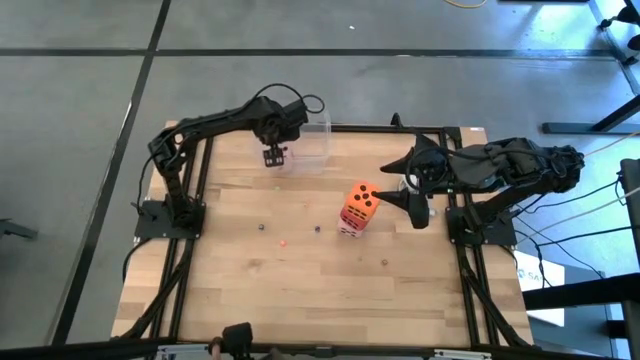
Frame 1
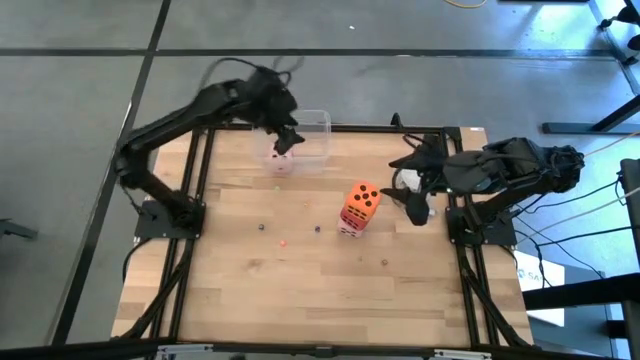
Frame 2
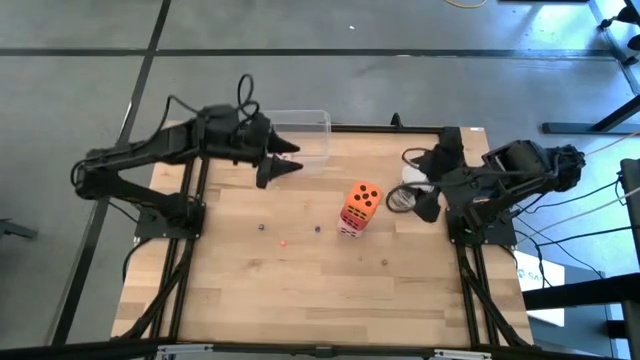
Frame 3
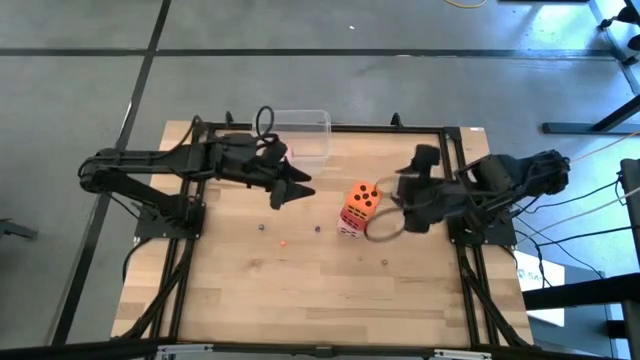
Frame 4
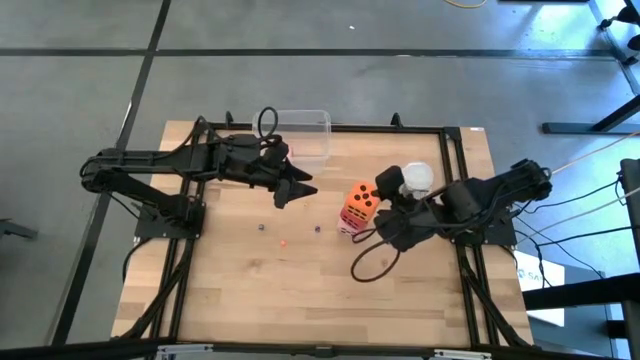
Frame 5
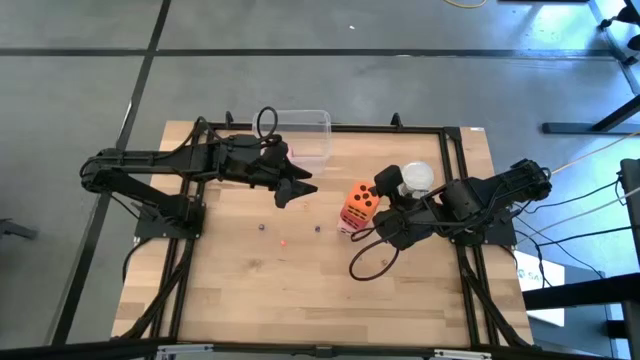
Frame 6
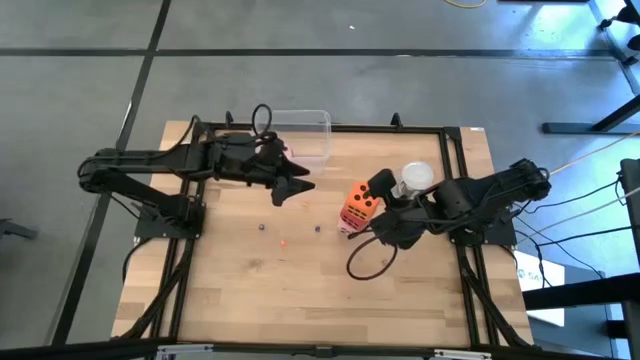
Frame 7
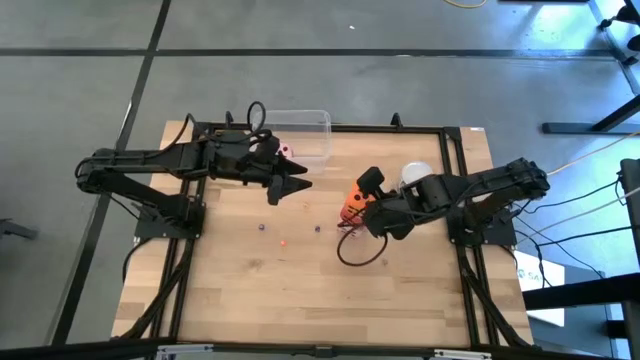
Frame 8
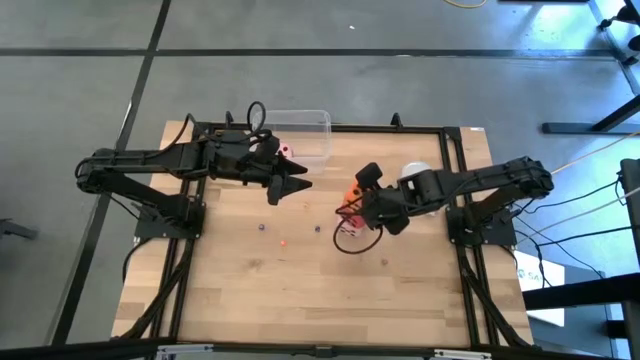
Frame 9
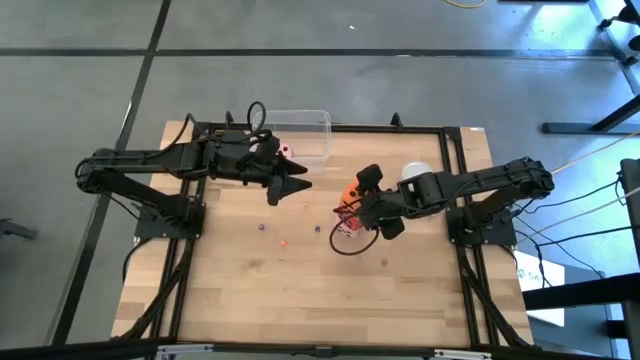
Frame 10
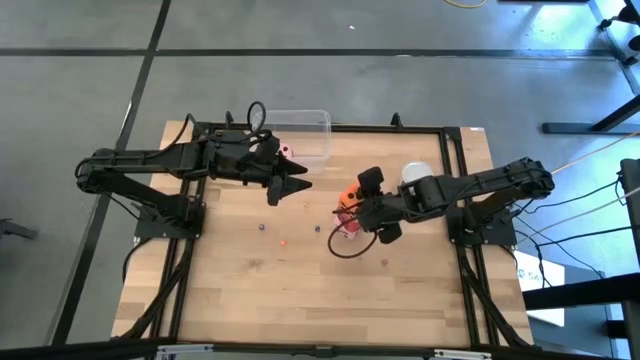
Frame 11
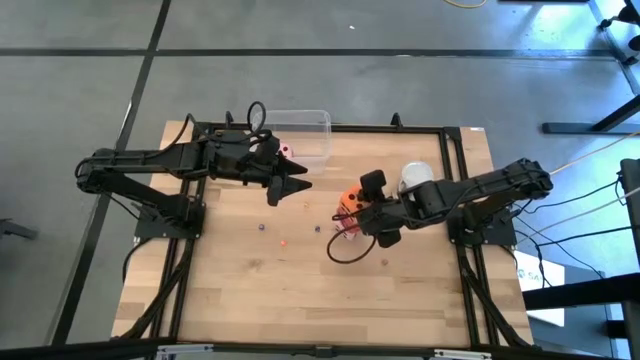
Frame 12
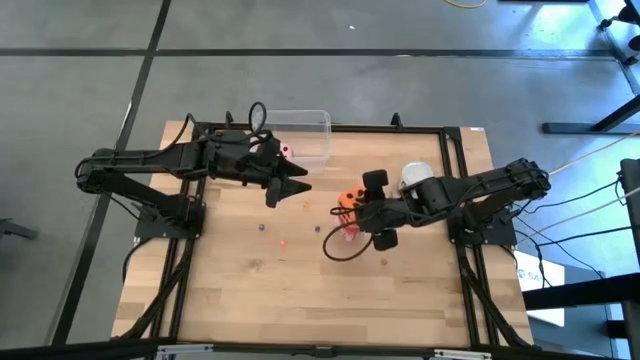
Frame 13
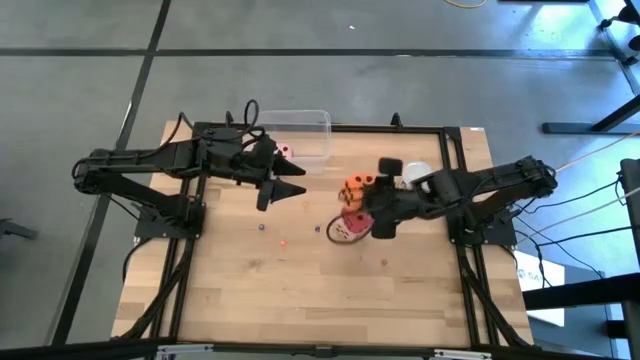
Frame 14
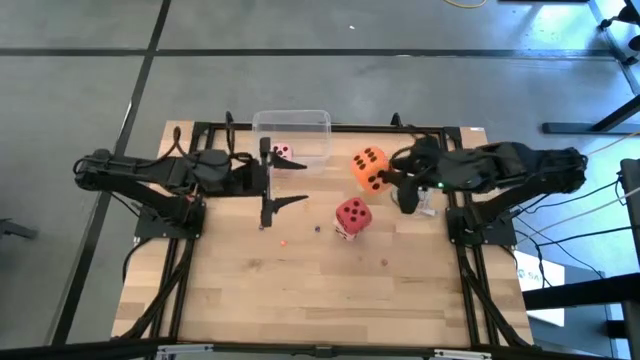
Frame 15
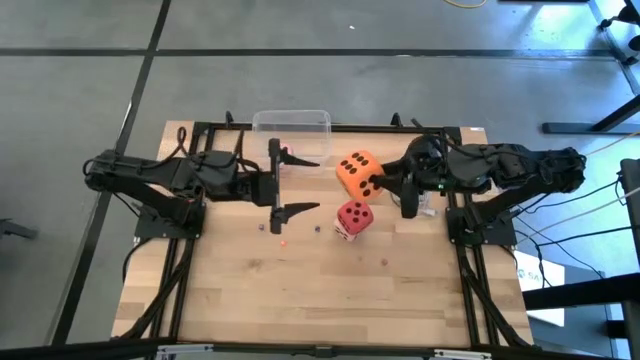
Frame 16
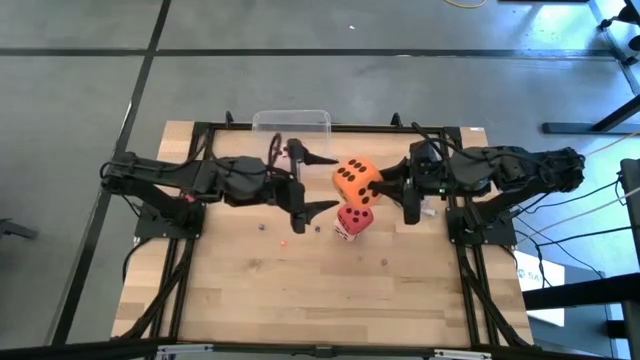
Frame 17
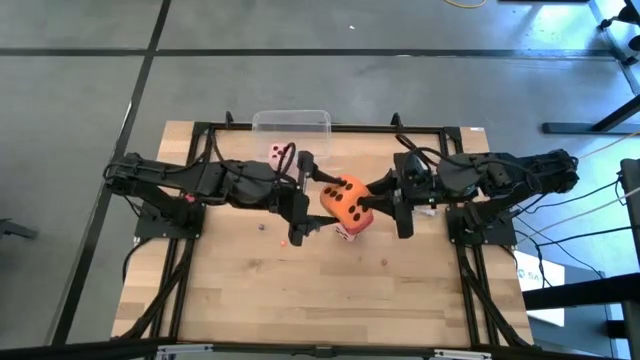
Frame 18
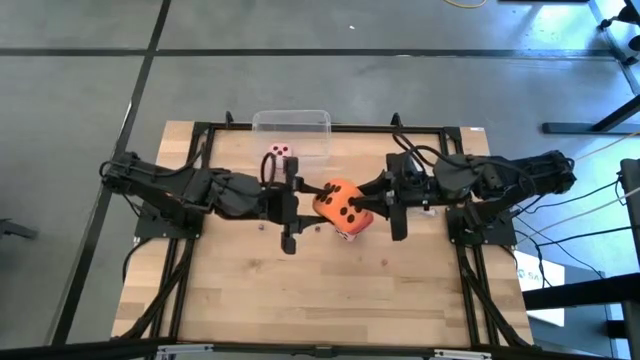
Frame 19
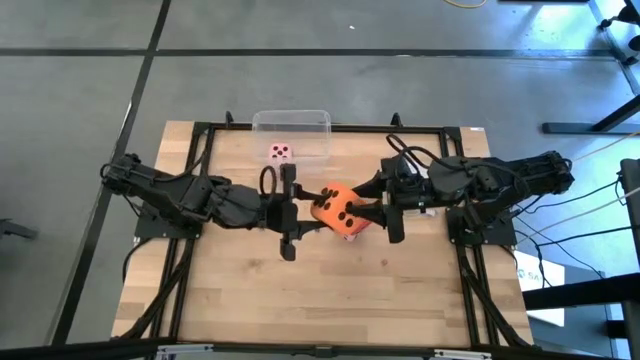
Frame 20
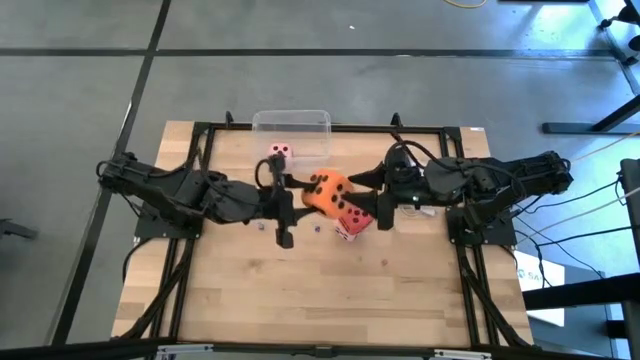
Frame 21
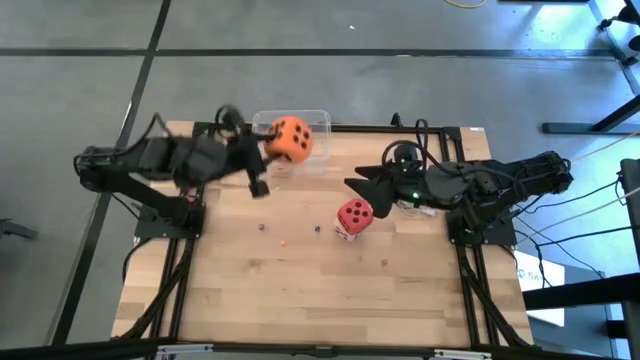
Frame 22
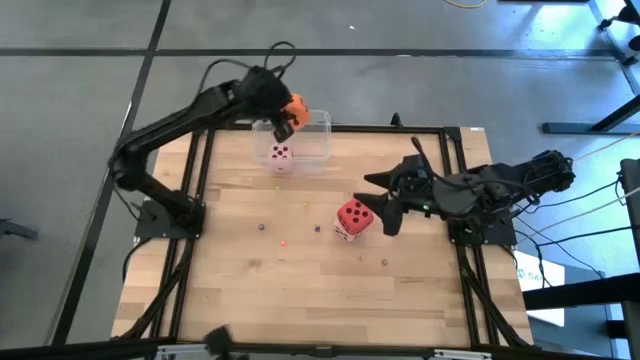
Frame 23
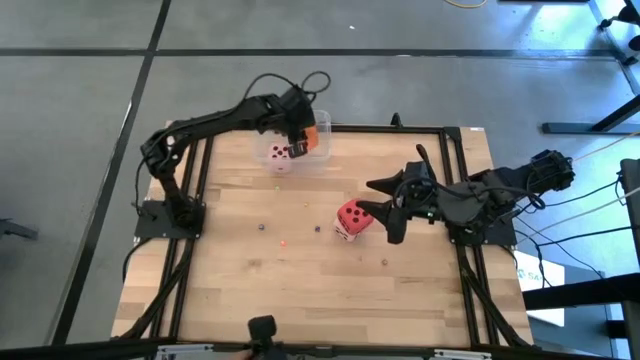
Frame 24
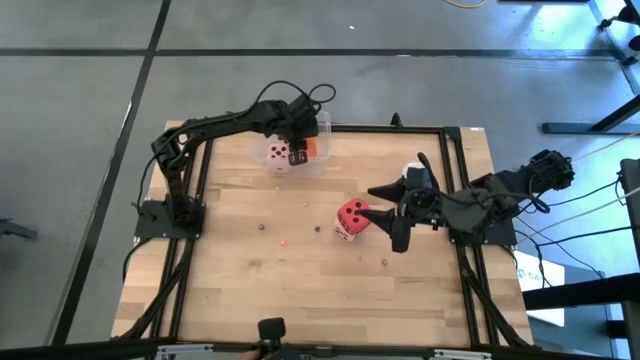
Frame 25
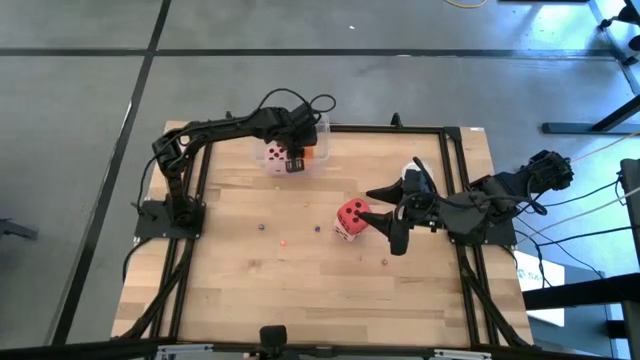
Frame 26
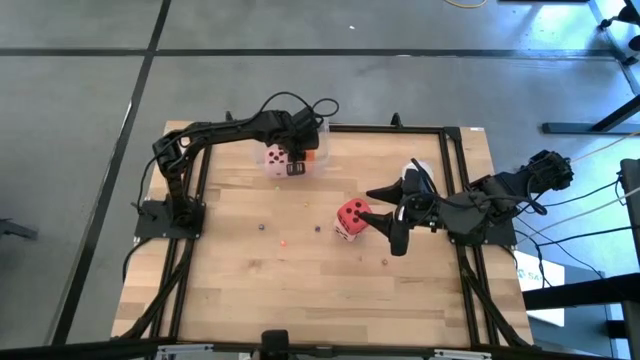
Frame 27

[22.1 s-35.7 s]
Task: Pick & Place Dice
Put the large orange dice into the transparent bin

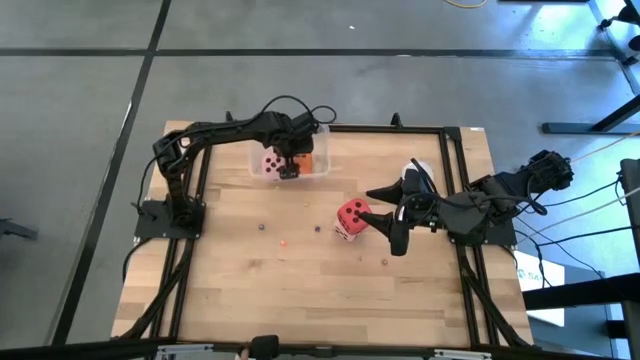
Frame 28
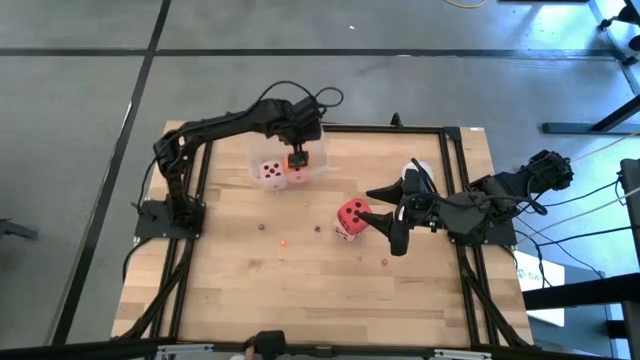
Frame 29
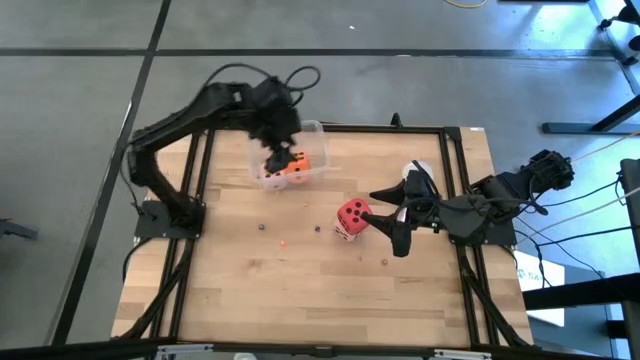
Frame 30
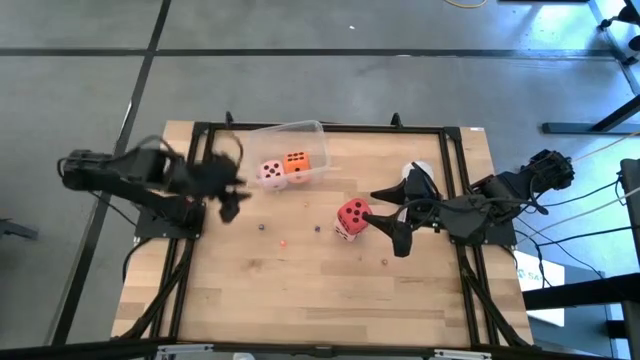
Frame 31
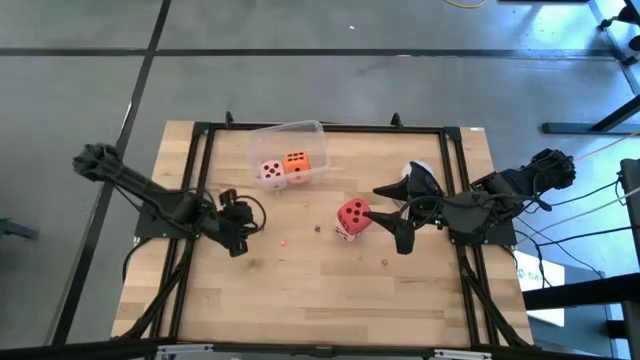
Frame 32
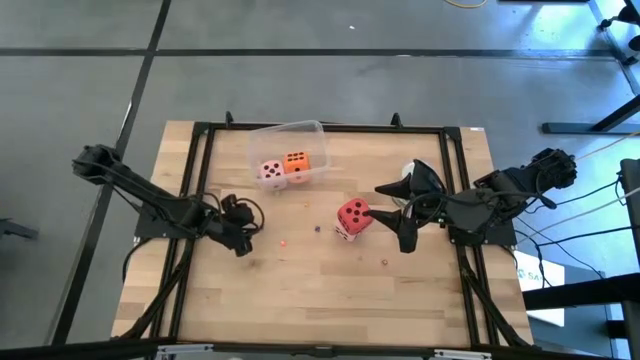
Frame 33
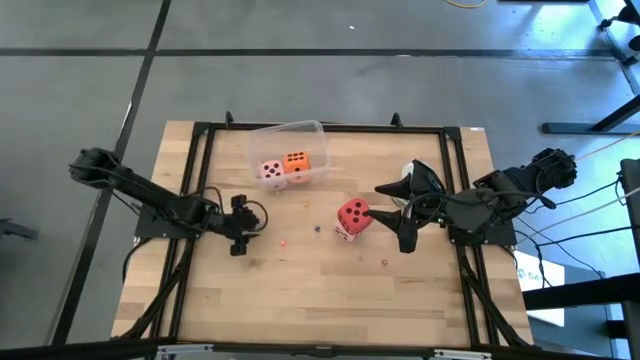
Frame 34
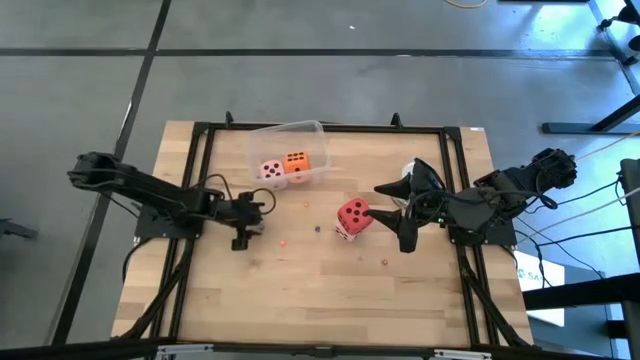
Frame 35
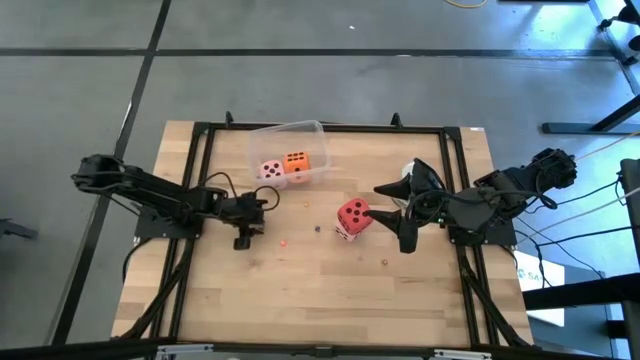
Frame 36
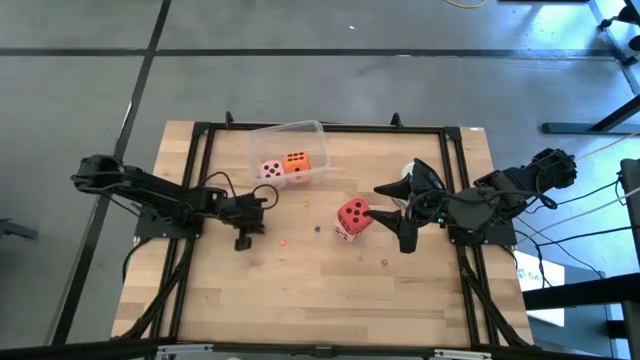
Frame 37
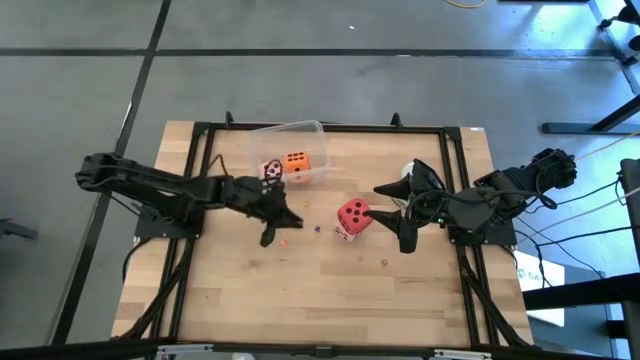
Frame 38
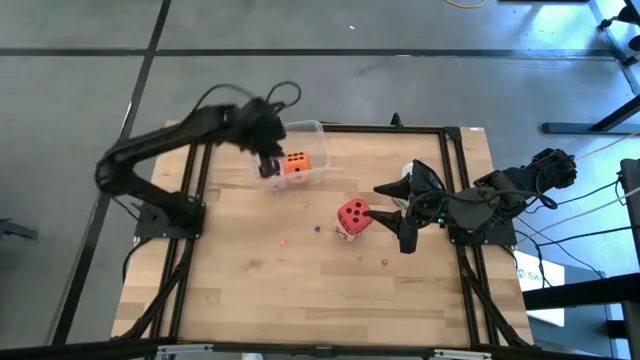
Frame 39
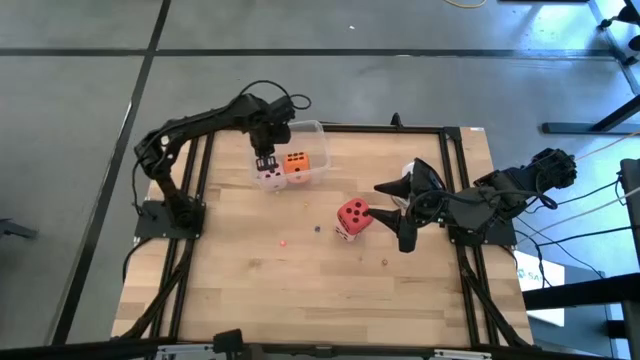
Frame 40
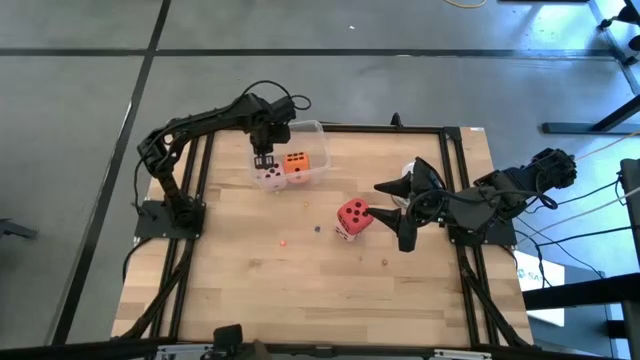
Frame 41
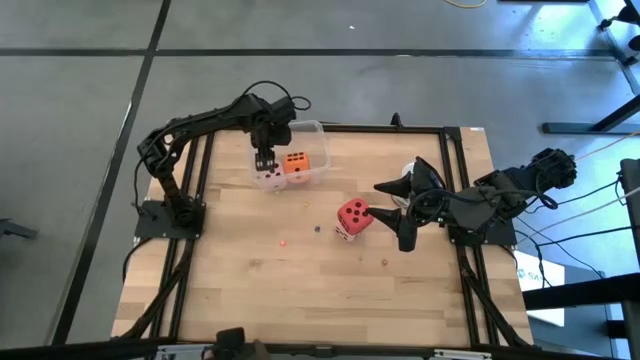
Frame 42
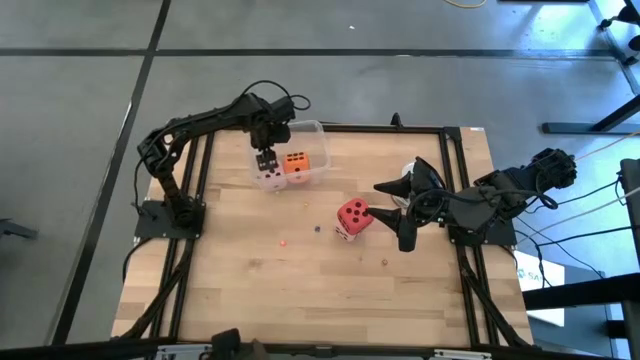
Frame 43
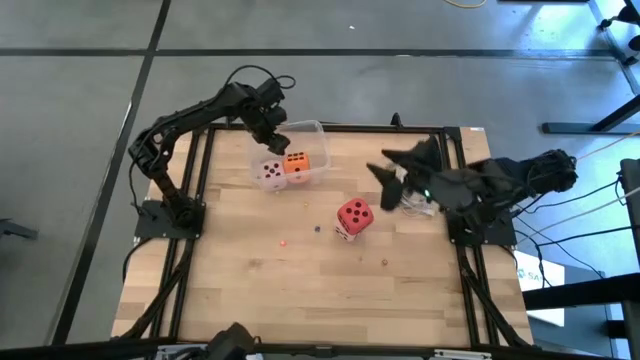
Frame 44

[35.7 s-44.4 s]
Put the left small blue dice into the transparent bin
